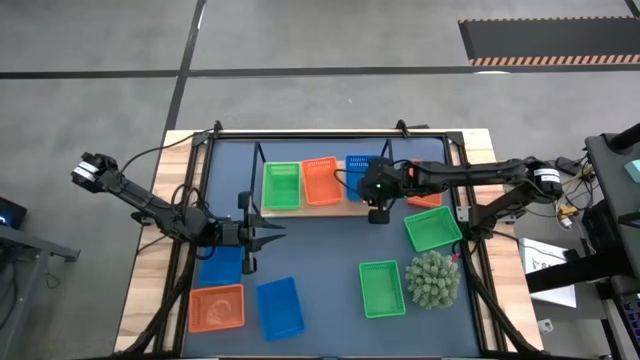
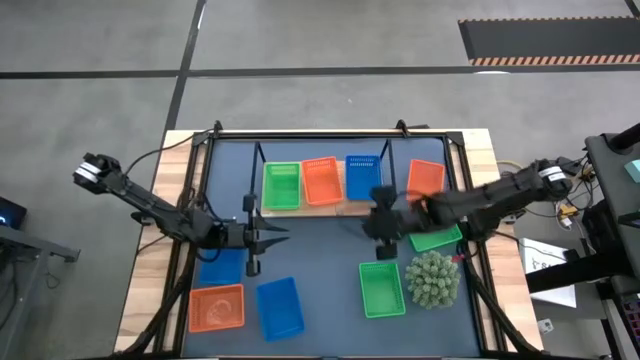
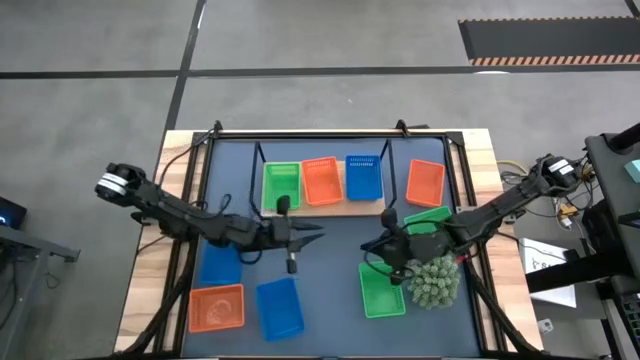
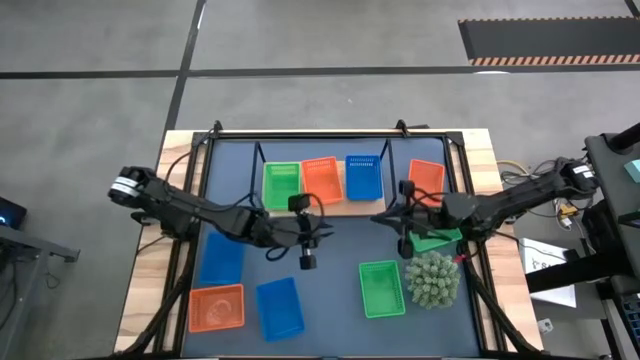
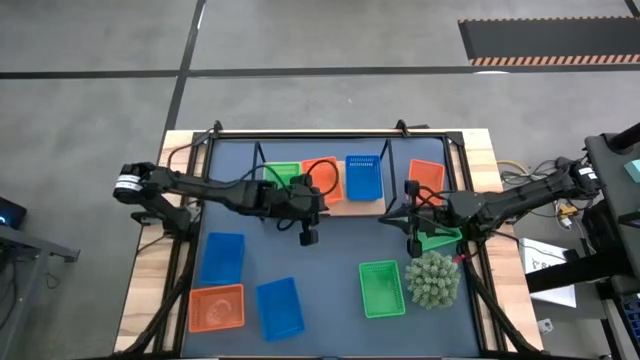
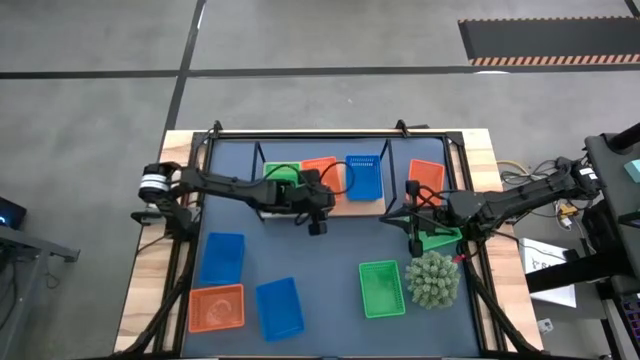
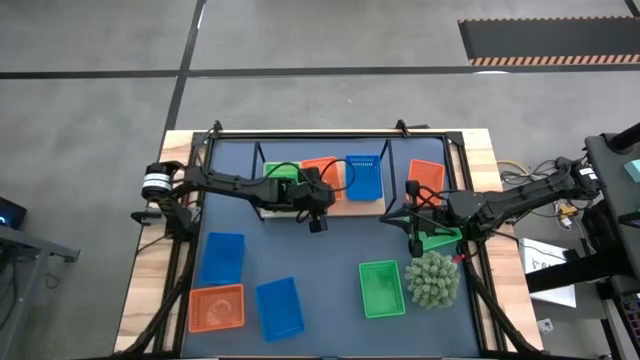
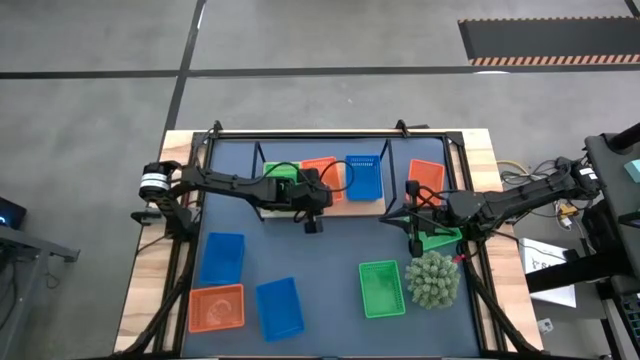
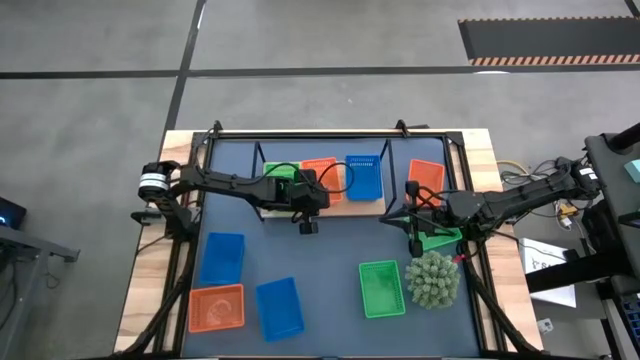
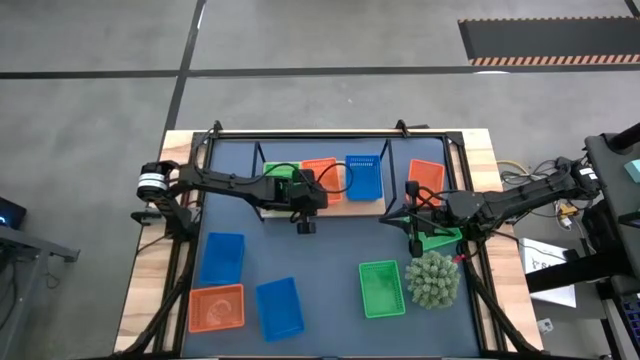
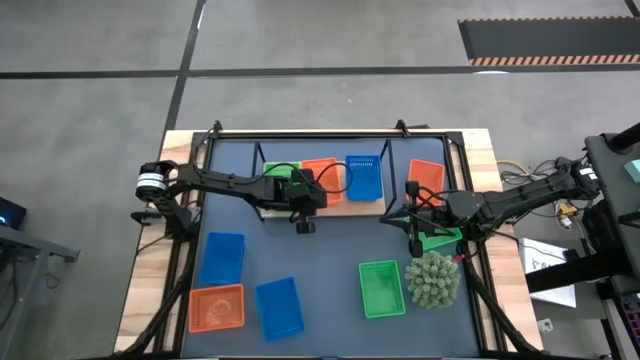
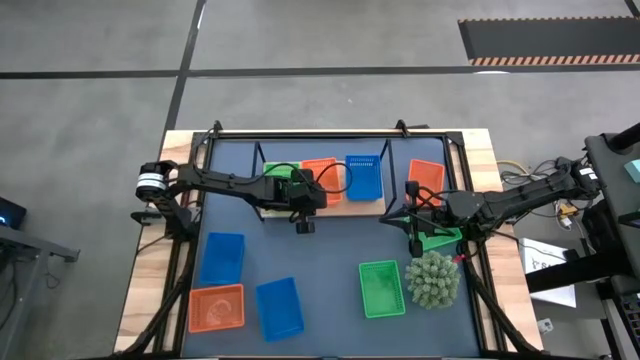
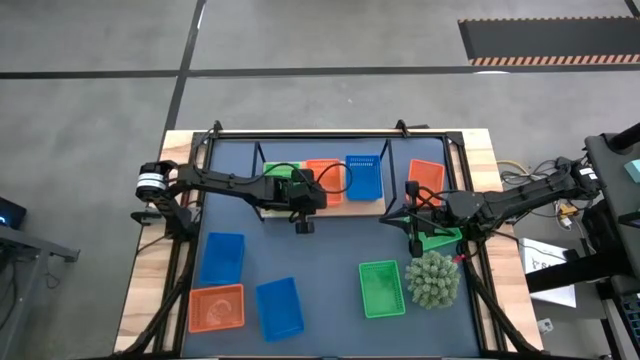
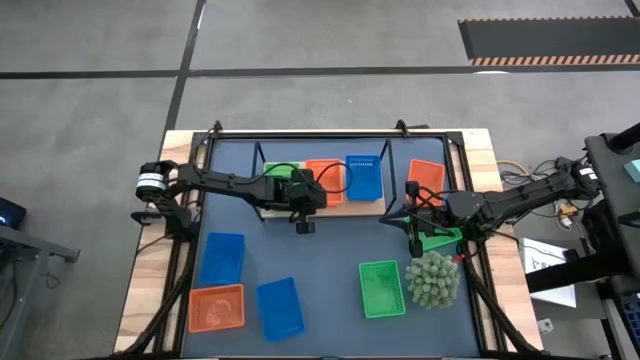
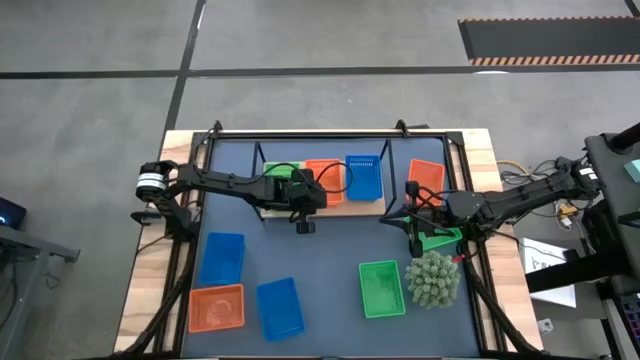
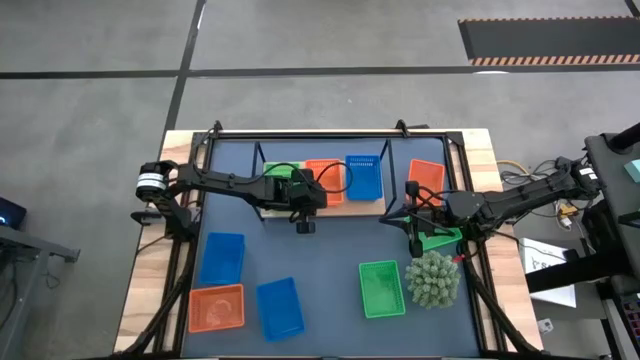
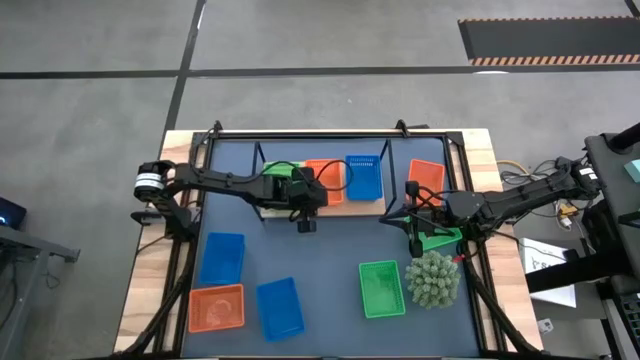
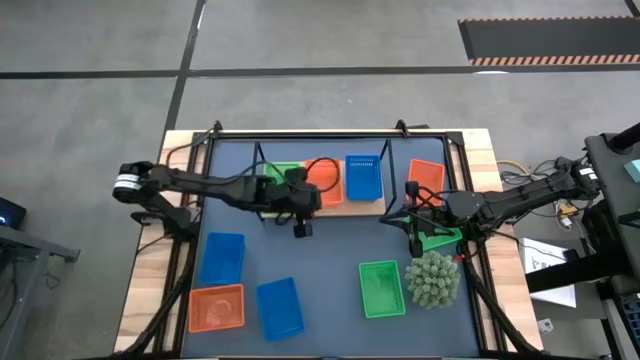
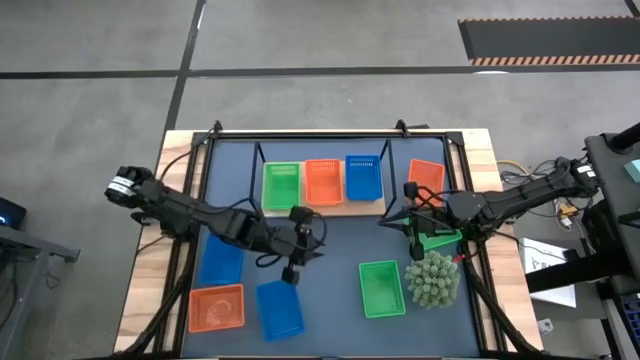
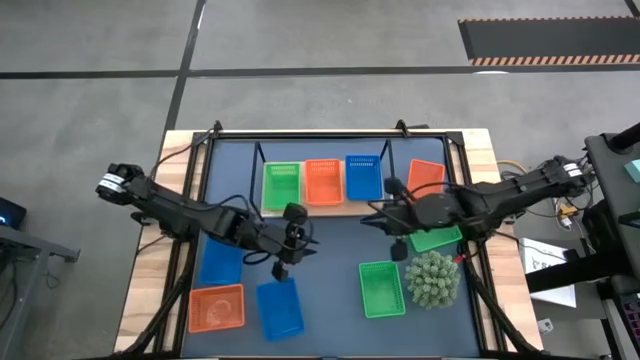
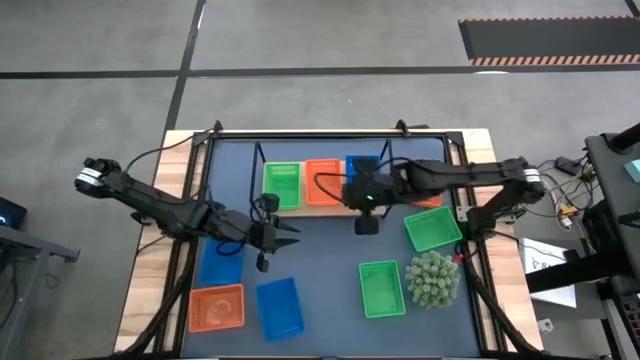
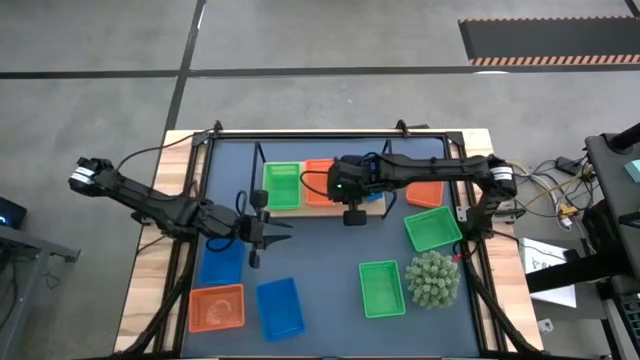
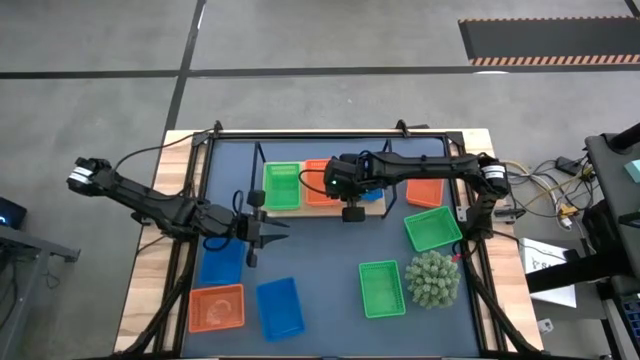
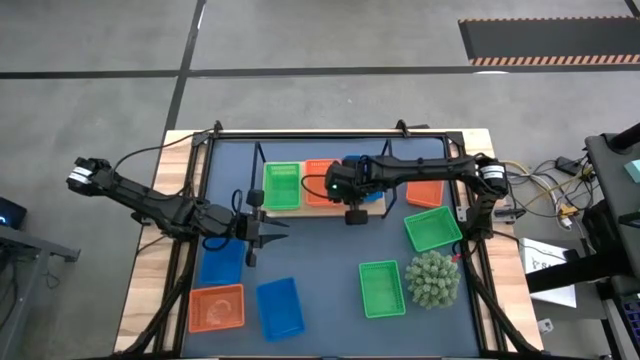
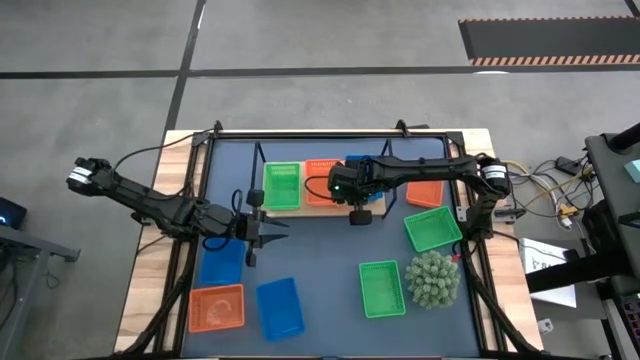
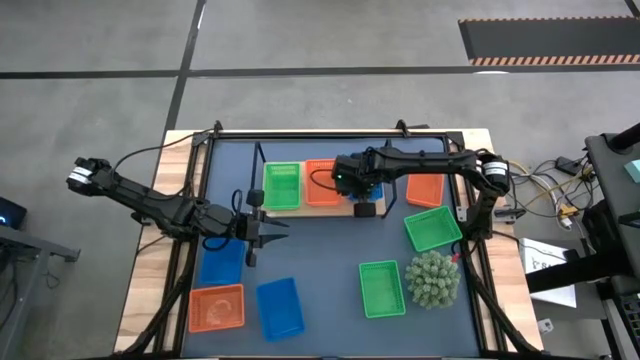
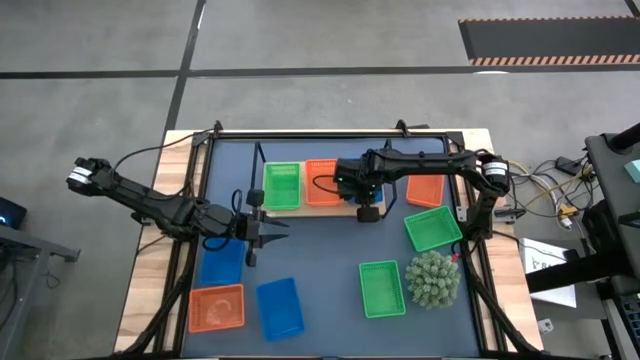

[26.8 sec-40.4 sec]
Task: Stack baskets on shelf by color
Adjust the baskets on the shelf

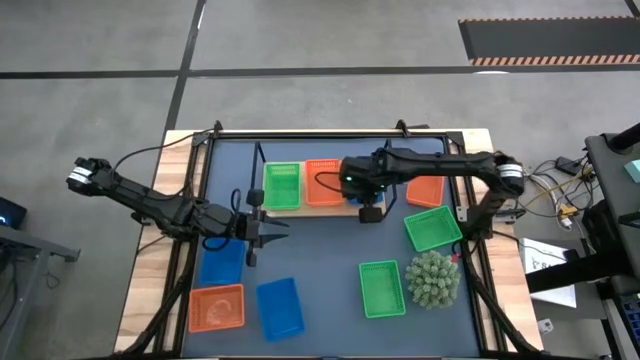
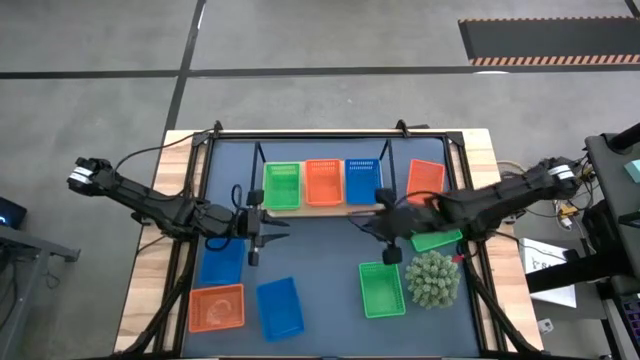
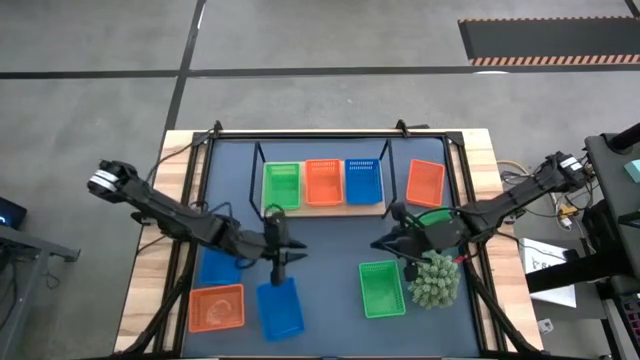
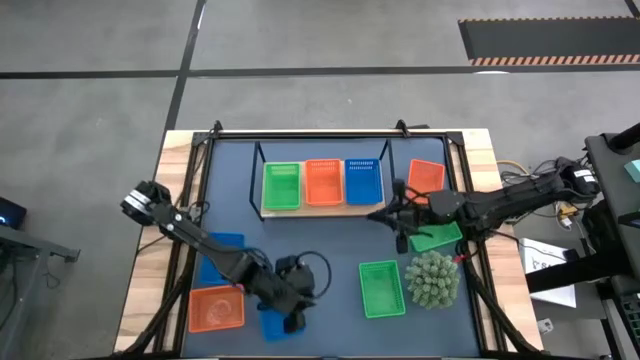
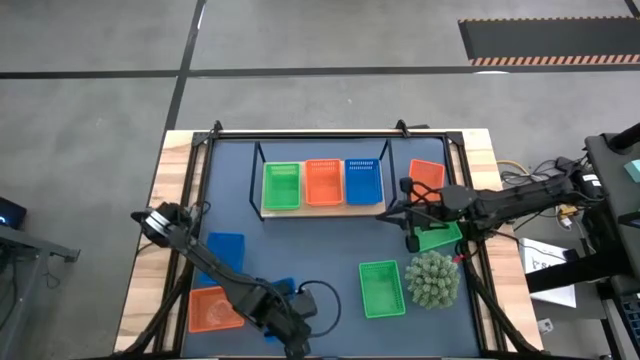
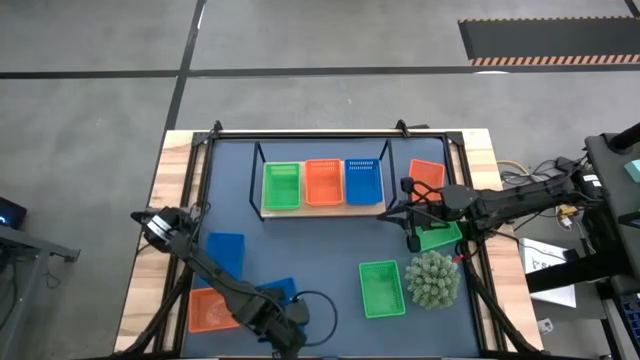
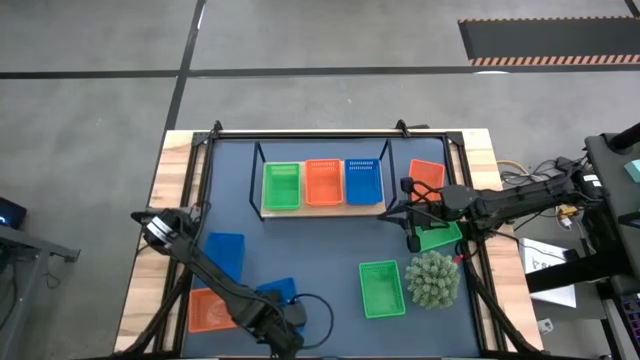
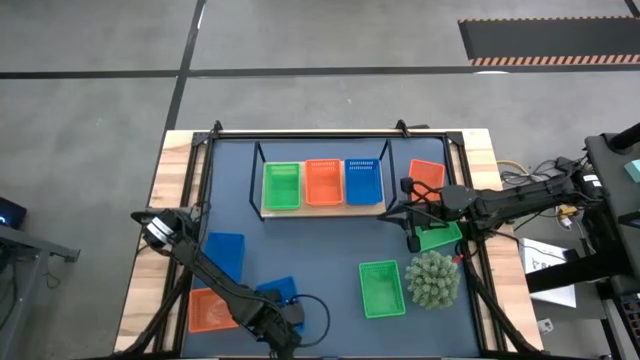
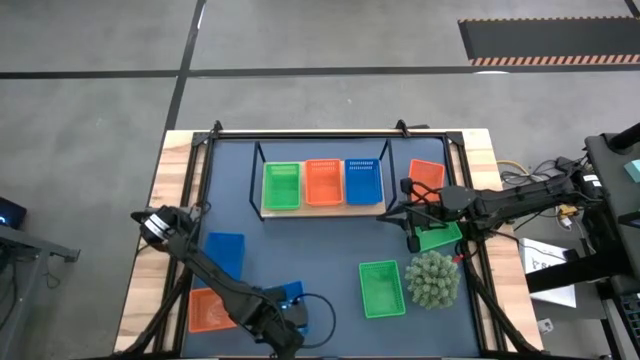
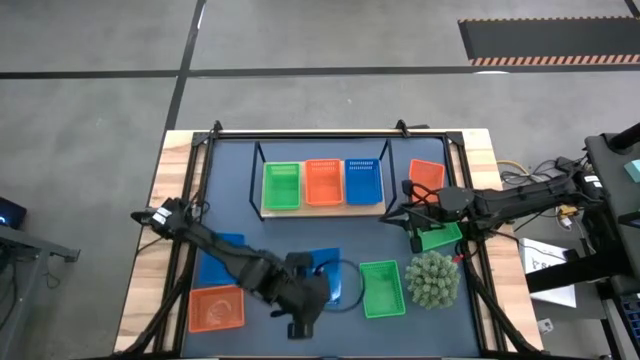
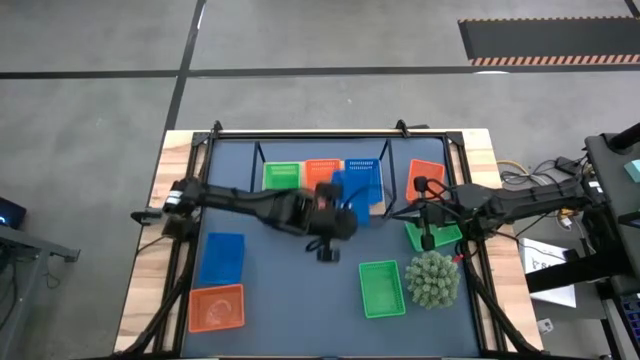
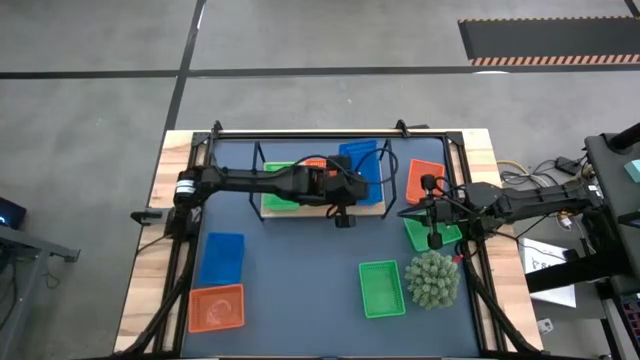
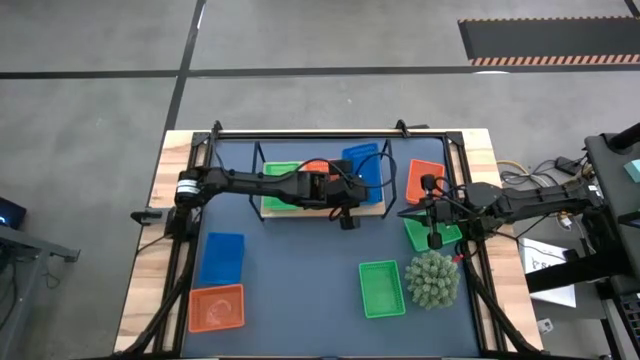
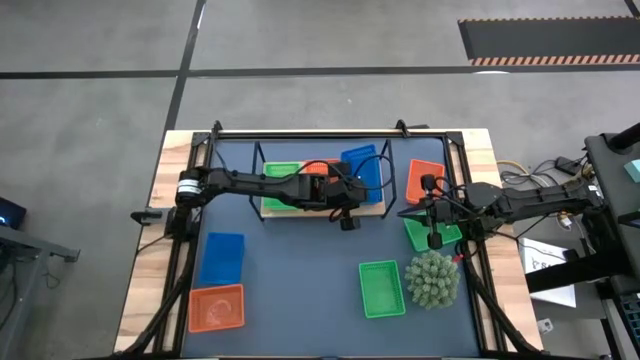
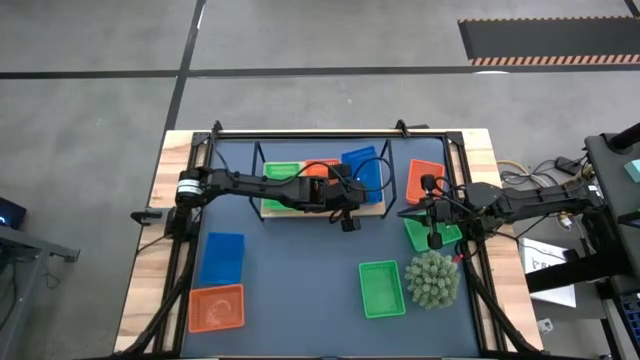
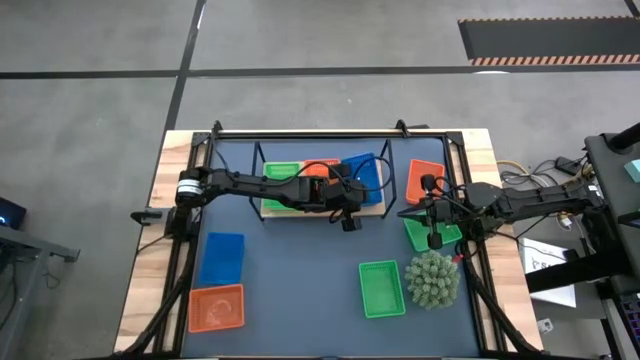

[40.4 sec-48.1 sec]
Stack the bottom blue basket on top of the blue basket on the shelf
